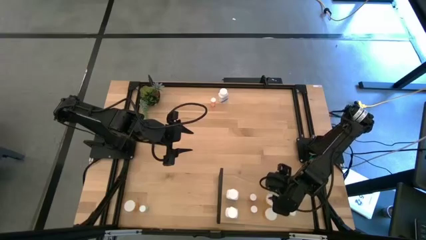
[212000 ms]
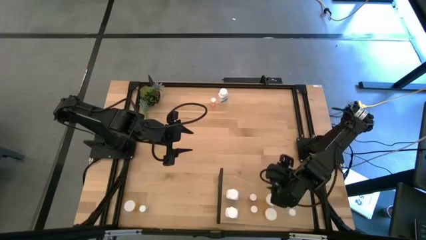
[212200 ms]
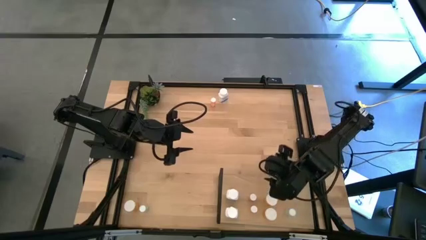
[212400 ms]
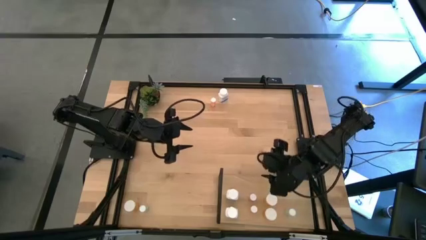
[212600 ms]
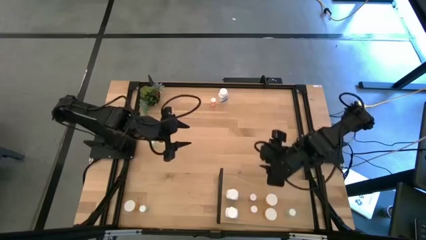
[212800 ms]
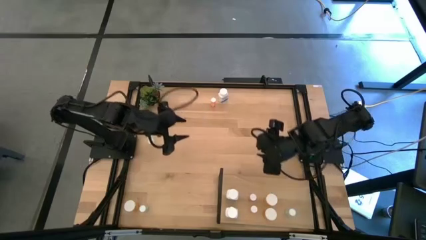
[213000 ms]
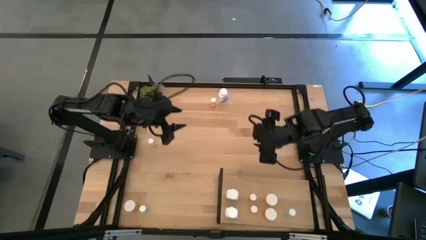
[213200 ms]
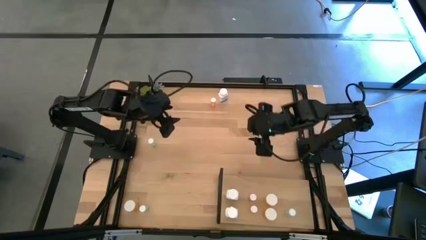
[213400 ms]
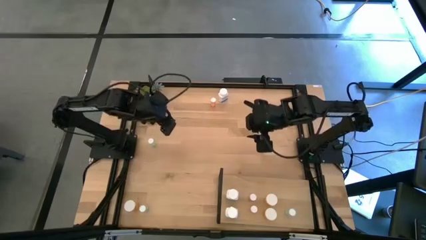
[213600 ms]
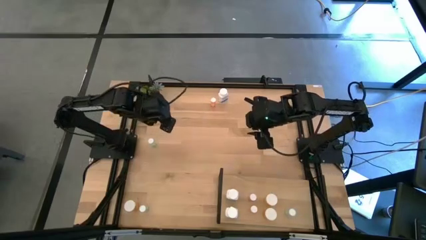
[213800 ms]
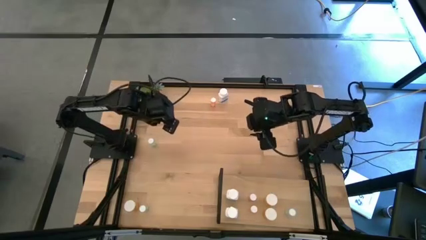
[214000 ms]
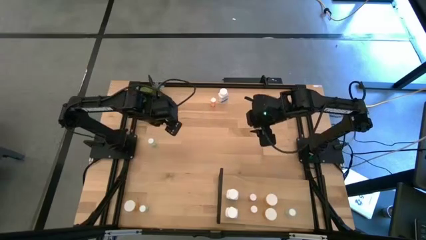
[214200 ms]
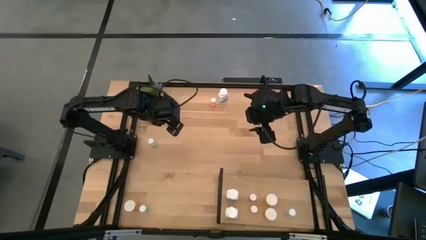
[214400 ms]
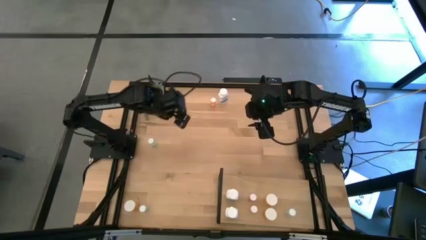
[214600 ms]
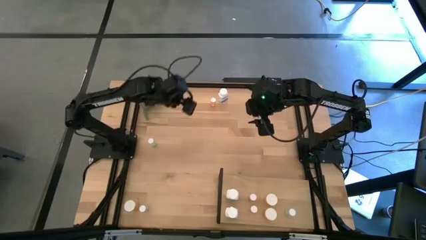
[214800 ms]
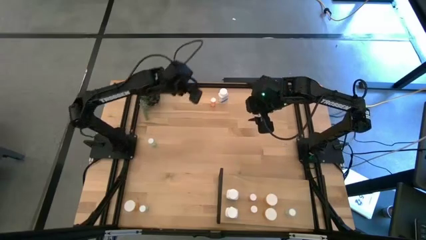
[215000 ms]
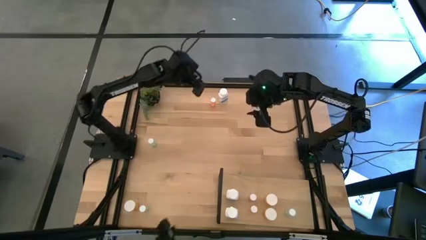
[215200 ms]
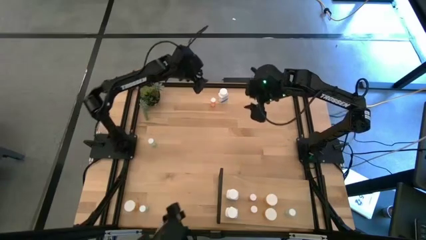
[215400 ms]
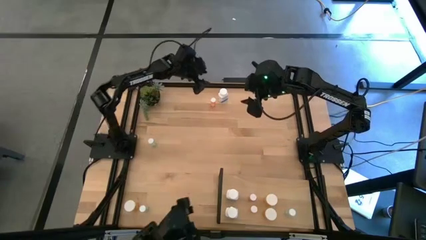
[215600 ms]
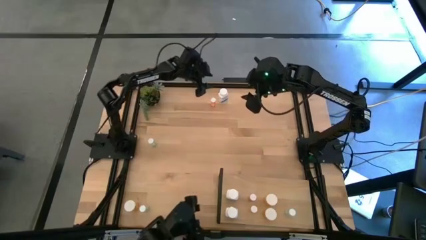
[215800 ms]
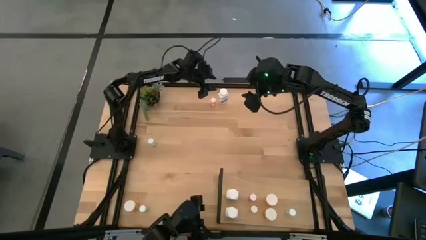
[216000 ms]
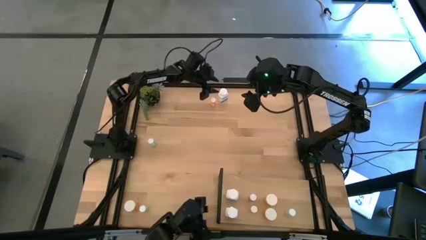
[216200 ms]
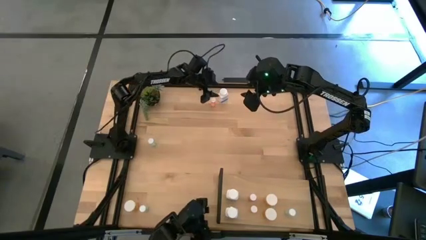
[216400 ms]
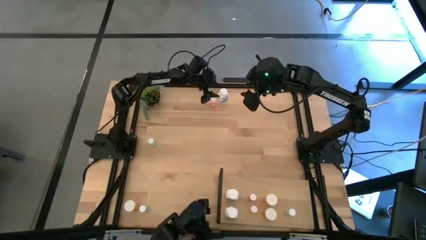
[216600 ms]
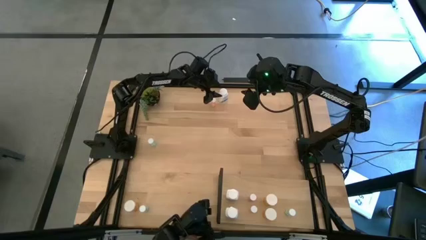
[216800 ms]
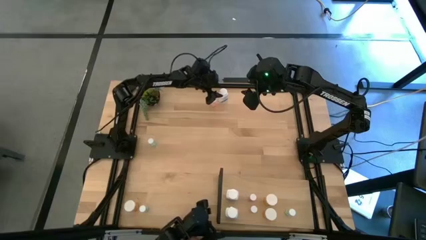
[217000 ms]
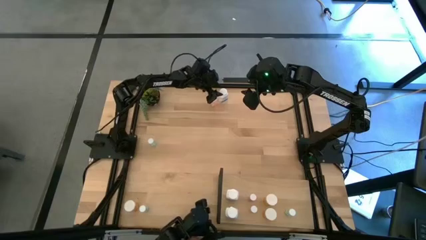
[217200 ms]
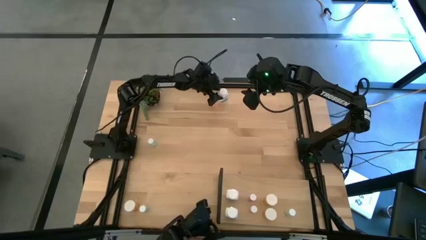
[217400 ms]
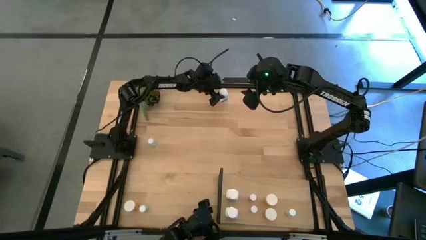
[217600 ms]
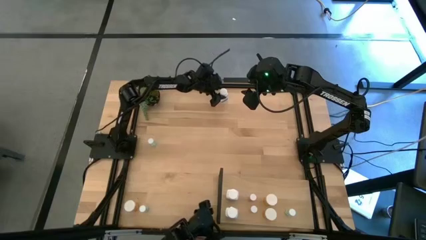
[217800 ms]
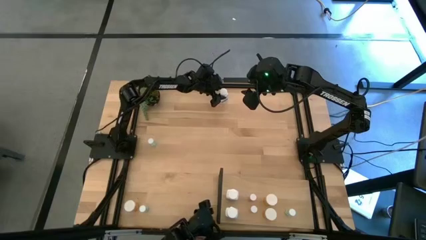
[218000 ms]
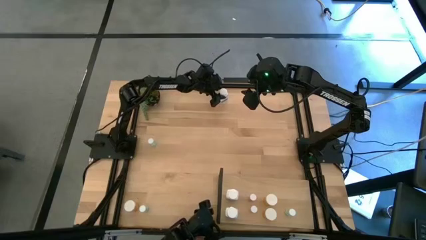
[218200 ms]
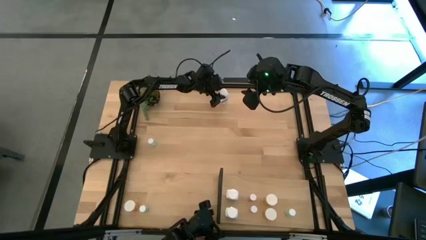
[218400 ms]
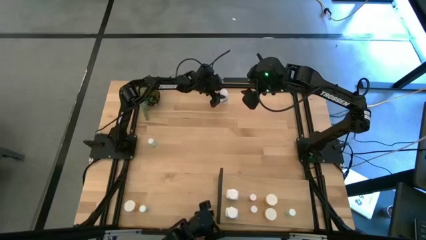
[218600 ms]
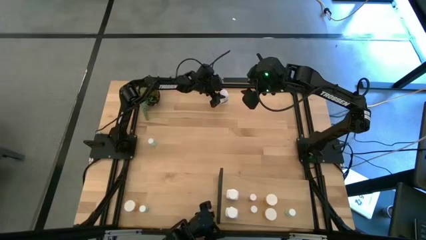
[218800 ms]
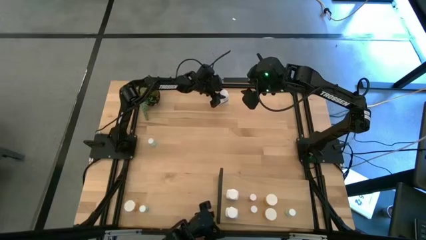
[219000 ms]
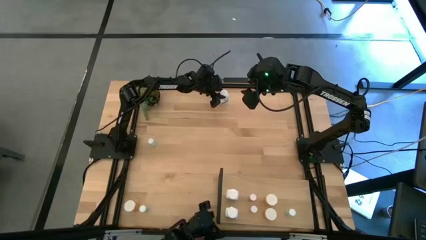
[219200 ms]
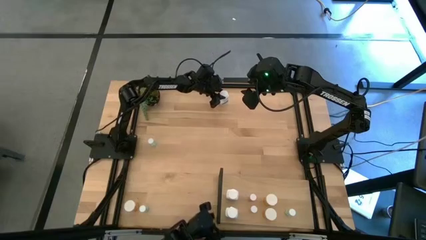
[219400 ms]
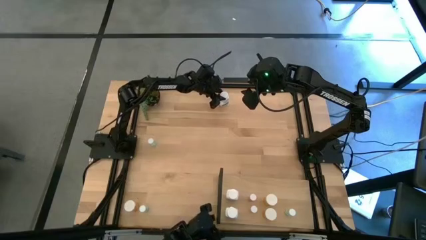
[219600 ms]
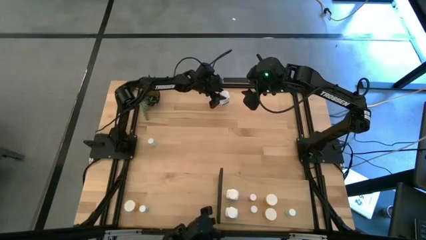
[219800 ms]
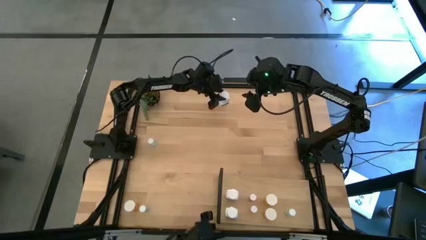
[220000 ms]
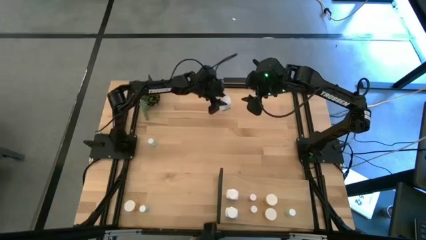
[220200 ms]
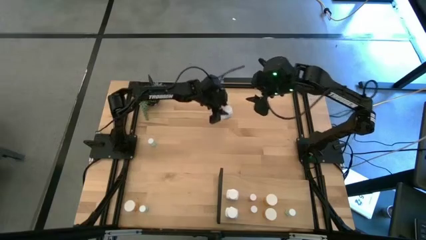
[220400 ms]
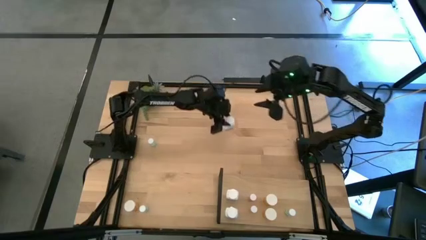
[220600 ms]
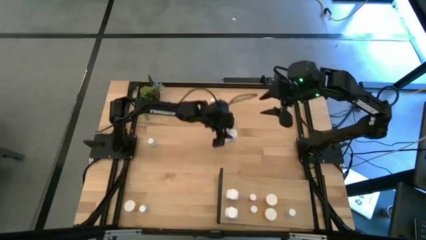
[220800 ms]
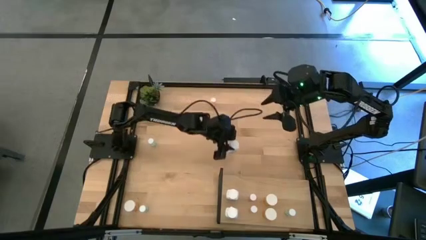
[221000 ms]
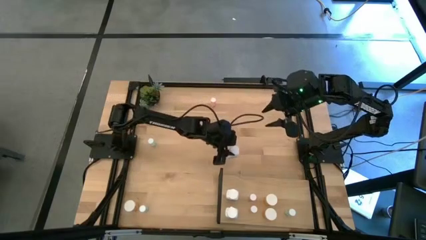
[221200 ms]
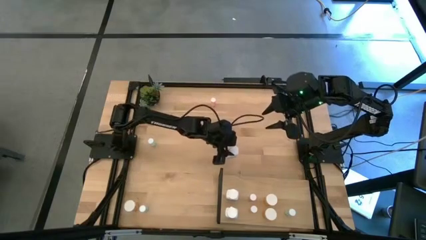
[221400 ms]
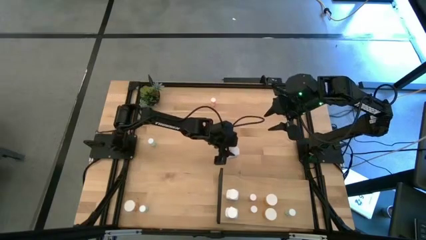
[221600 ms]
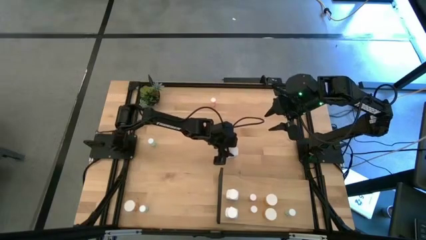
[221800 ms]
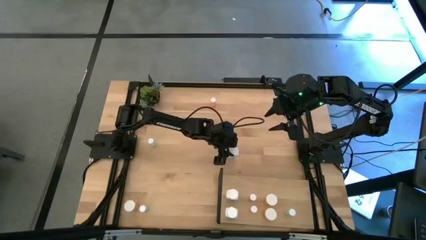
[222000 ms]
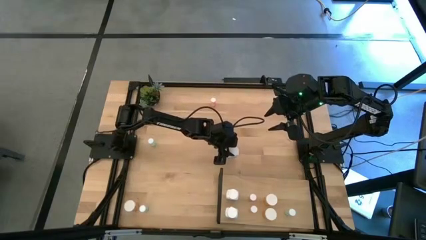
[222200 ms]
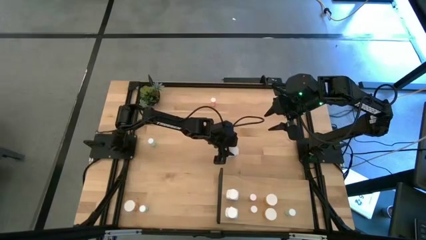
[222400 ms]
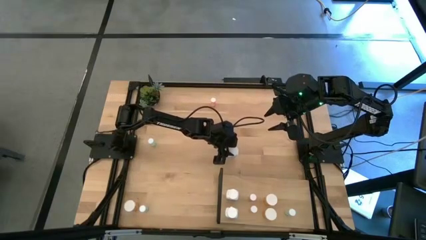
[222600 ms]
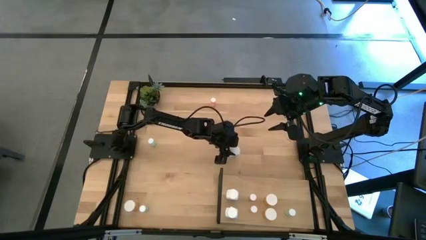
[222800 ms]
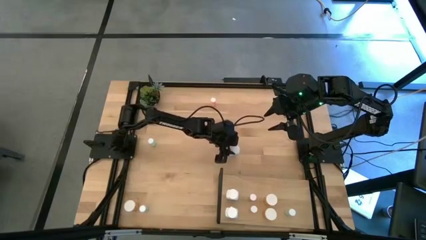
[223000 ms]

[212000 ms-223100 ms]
Task: Pick and place medicine bottles onto shelf by color
Put the top white pill bottle on the shelf
